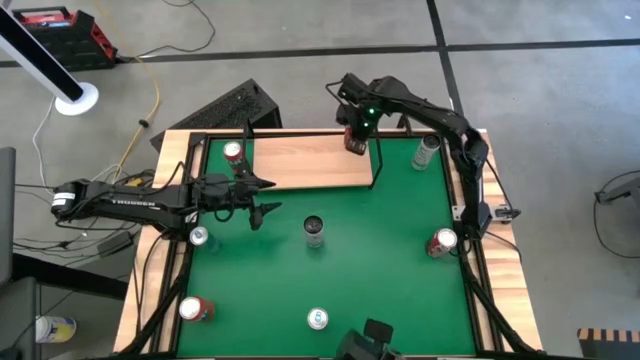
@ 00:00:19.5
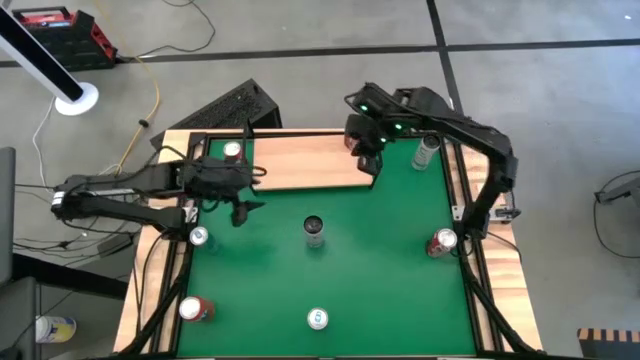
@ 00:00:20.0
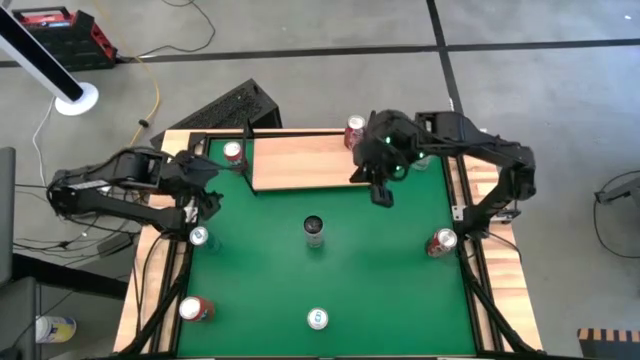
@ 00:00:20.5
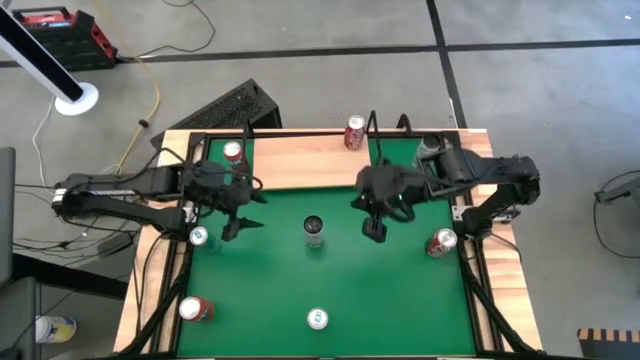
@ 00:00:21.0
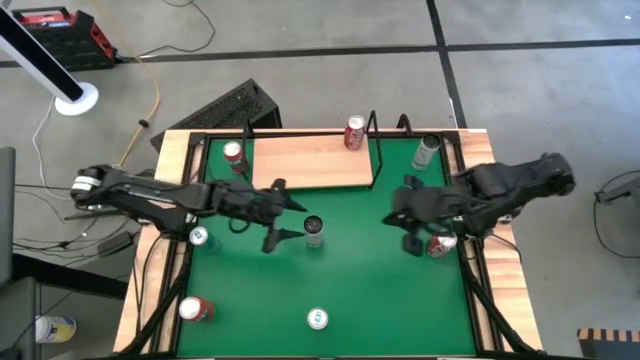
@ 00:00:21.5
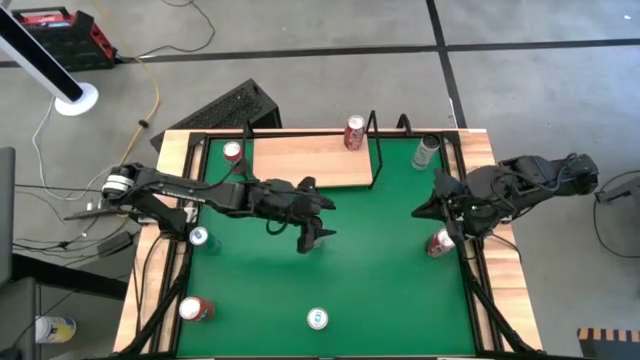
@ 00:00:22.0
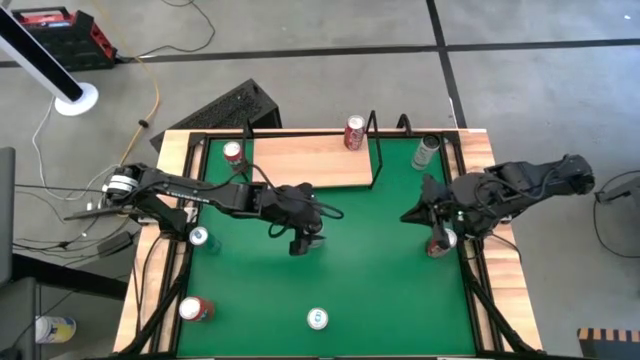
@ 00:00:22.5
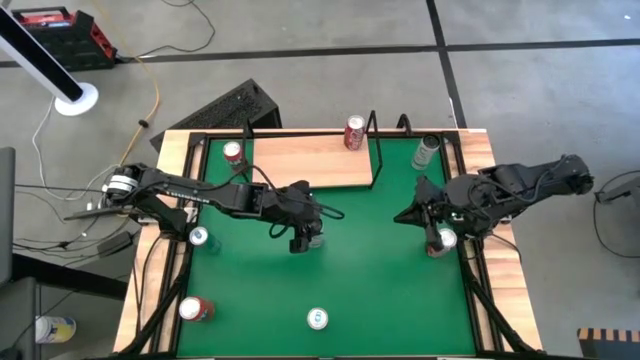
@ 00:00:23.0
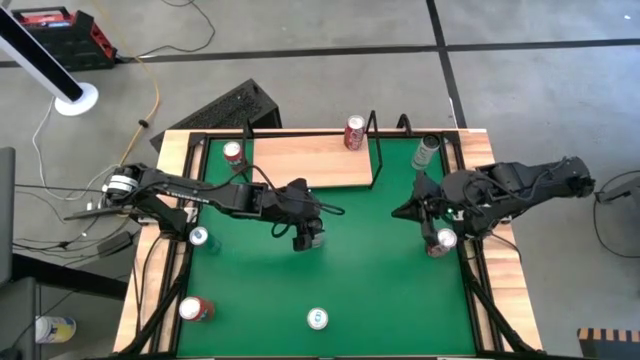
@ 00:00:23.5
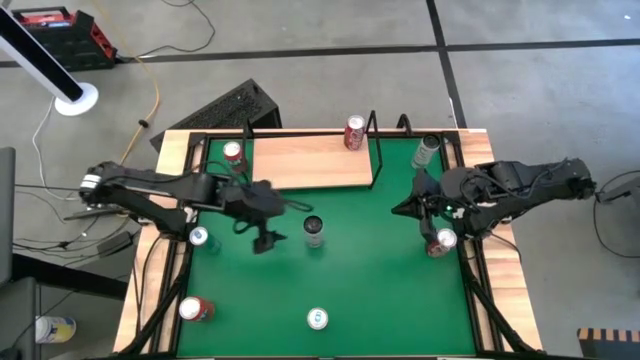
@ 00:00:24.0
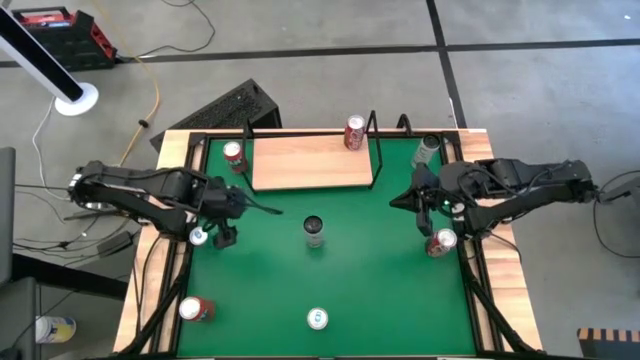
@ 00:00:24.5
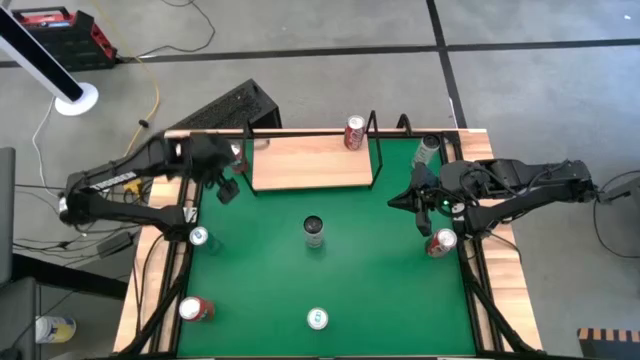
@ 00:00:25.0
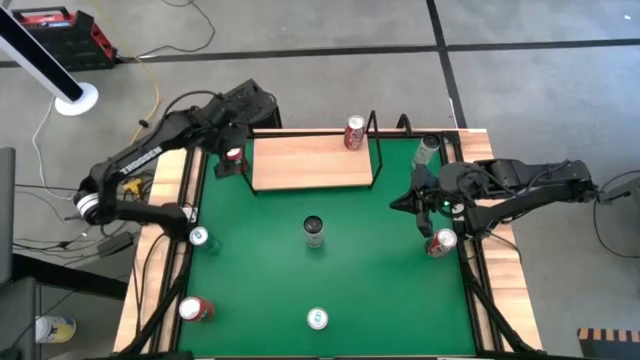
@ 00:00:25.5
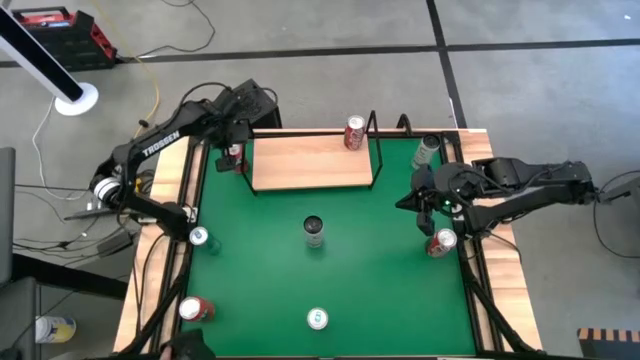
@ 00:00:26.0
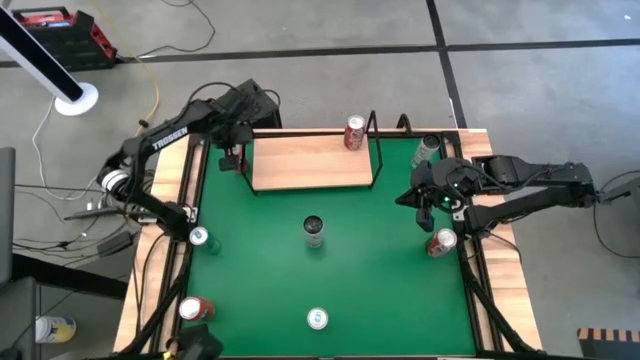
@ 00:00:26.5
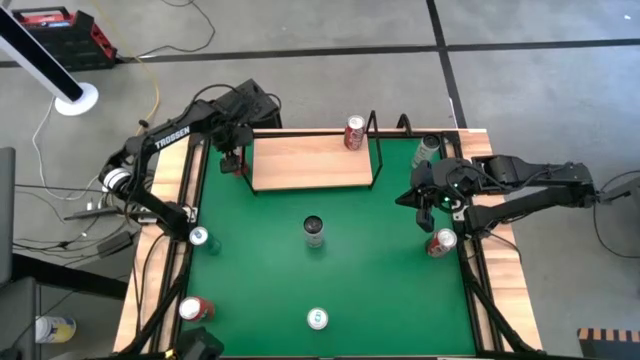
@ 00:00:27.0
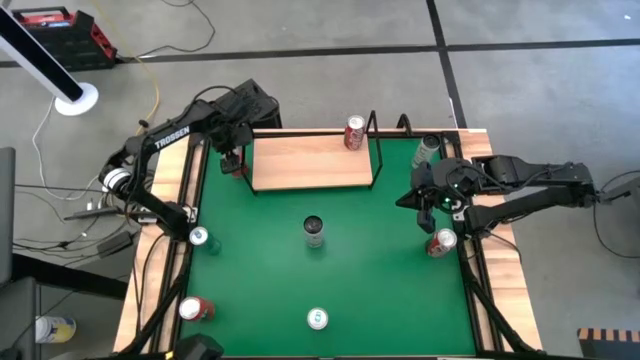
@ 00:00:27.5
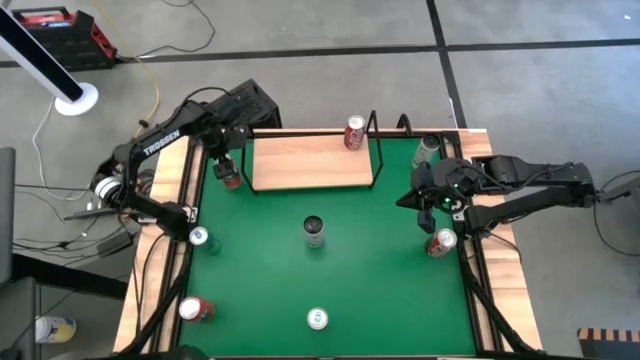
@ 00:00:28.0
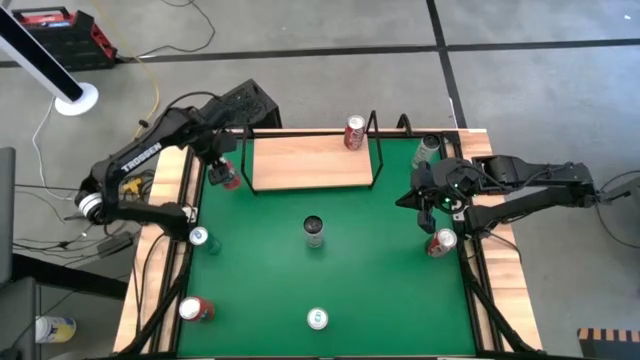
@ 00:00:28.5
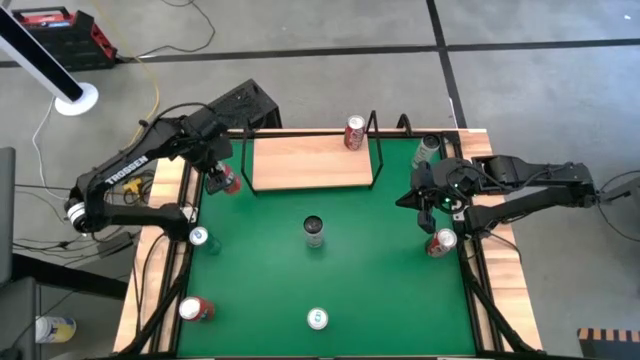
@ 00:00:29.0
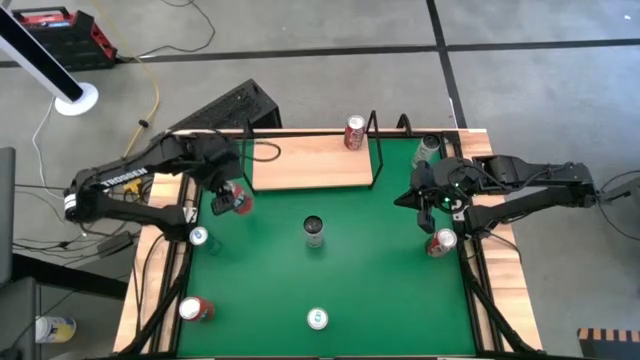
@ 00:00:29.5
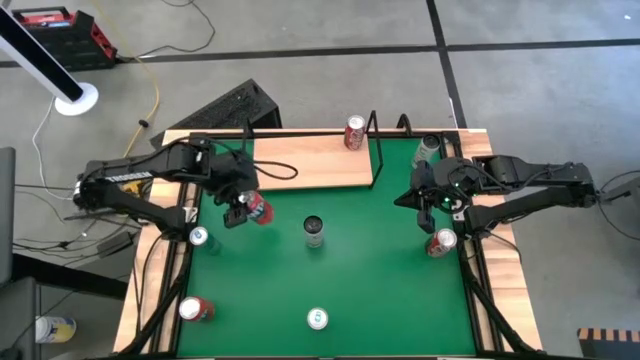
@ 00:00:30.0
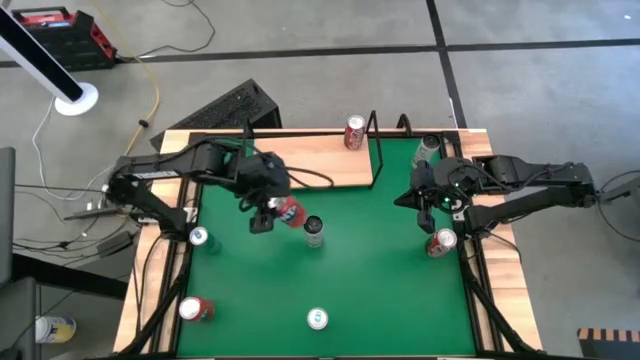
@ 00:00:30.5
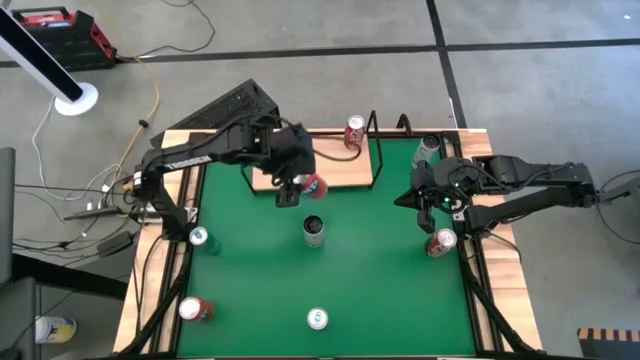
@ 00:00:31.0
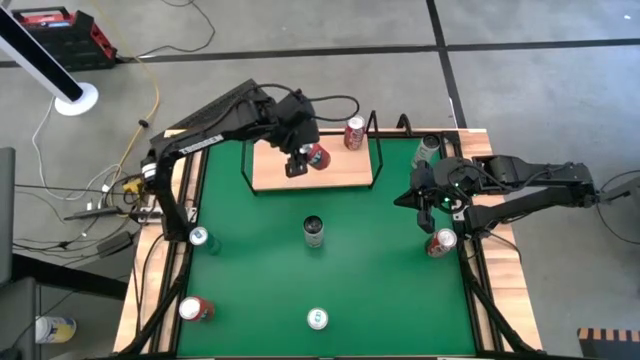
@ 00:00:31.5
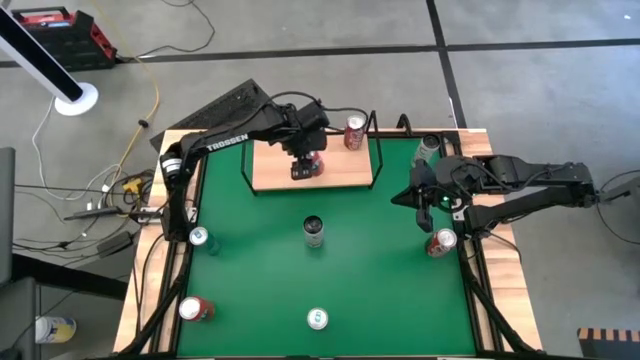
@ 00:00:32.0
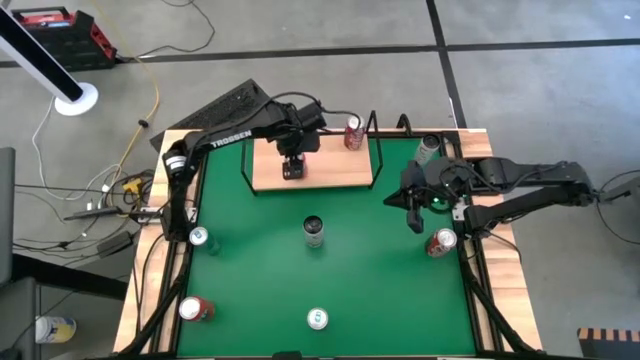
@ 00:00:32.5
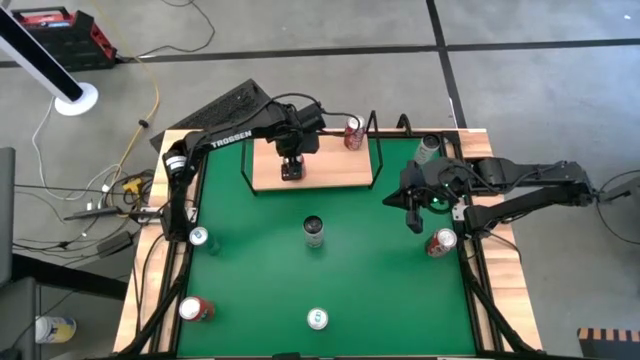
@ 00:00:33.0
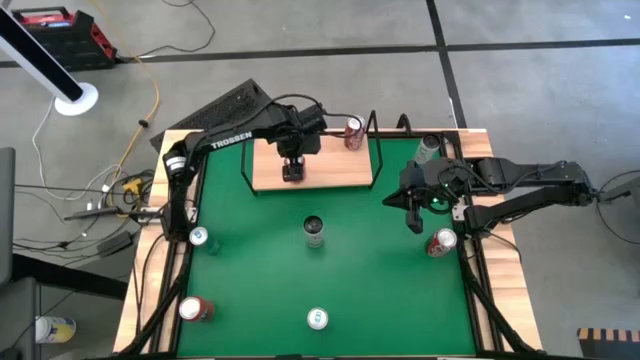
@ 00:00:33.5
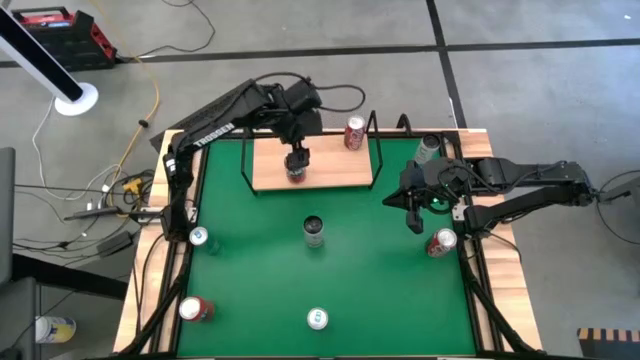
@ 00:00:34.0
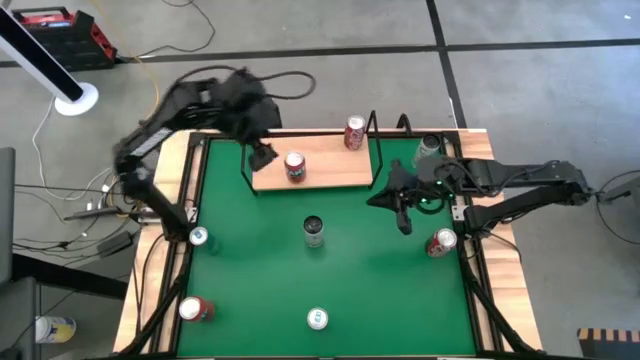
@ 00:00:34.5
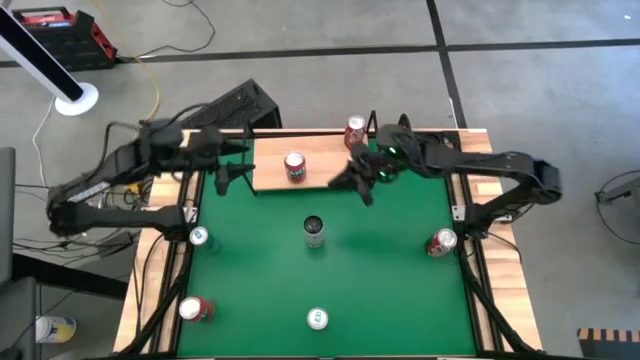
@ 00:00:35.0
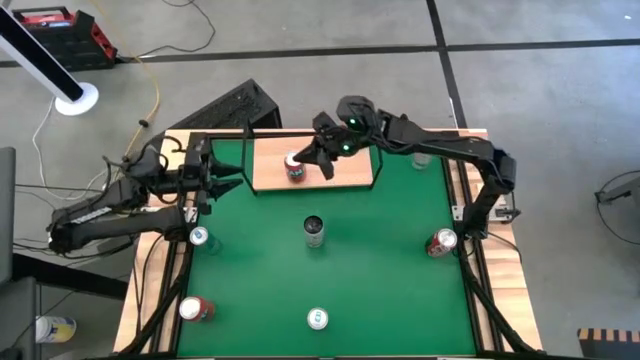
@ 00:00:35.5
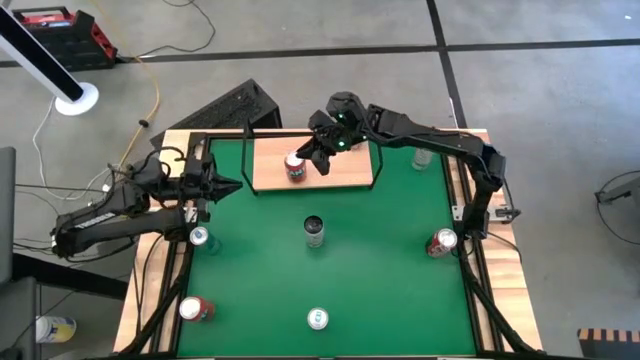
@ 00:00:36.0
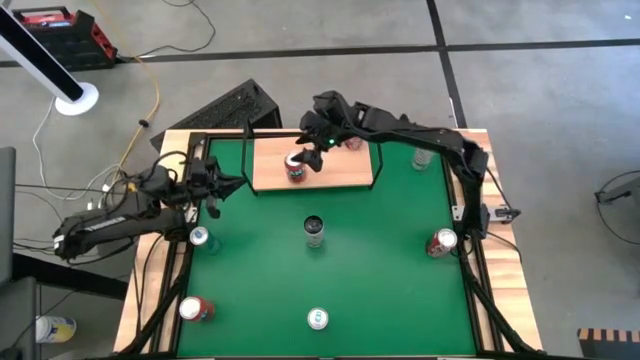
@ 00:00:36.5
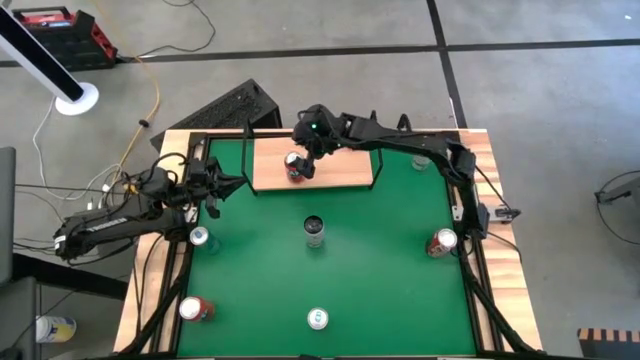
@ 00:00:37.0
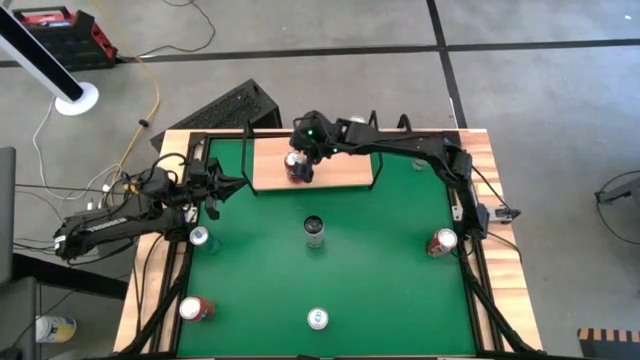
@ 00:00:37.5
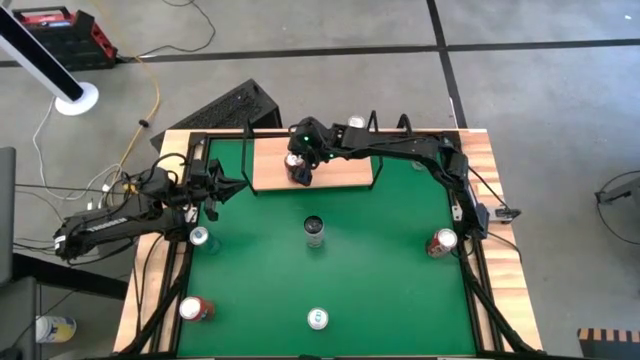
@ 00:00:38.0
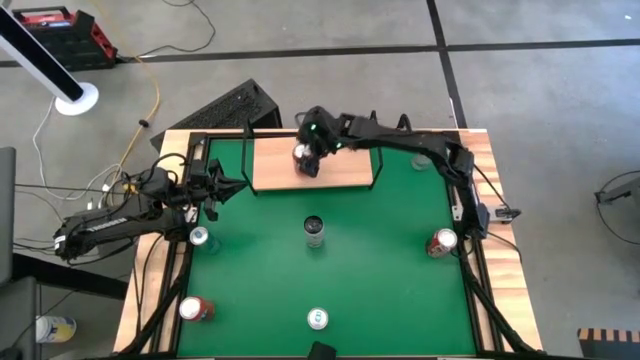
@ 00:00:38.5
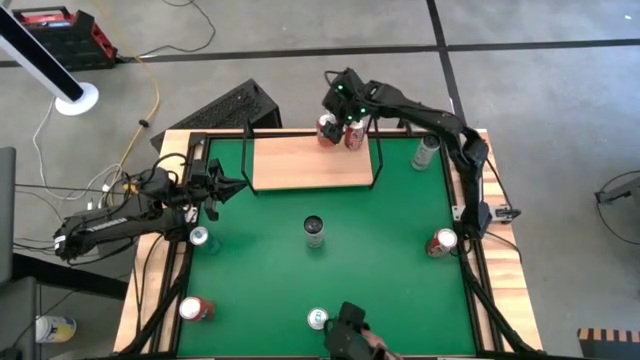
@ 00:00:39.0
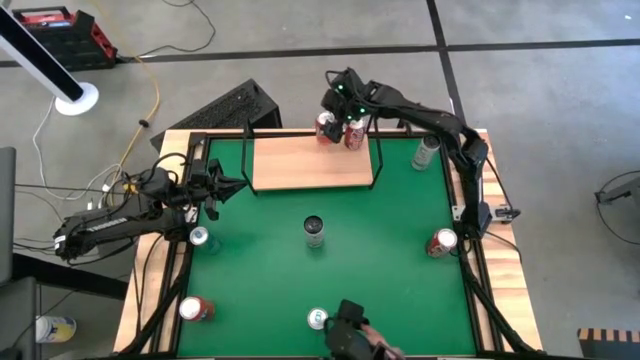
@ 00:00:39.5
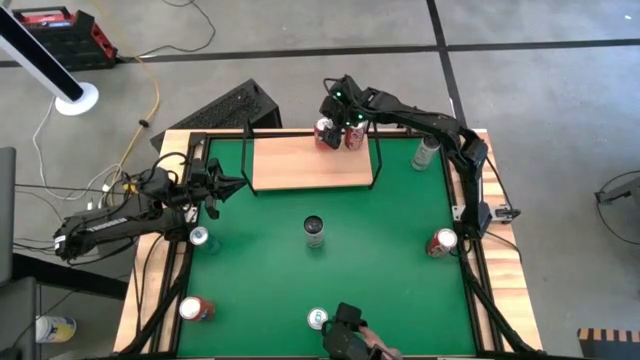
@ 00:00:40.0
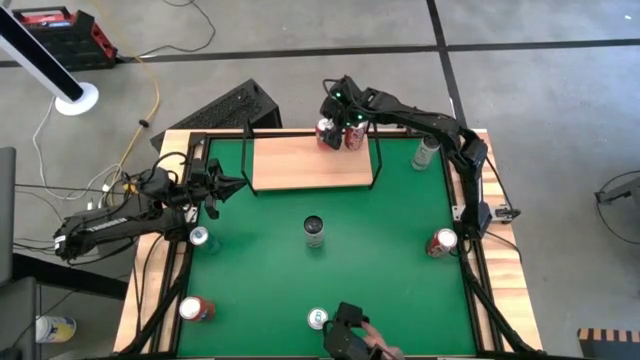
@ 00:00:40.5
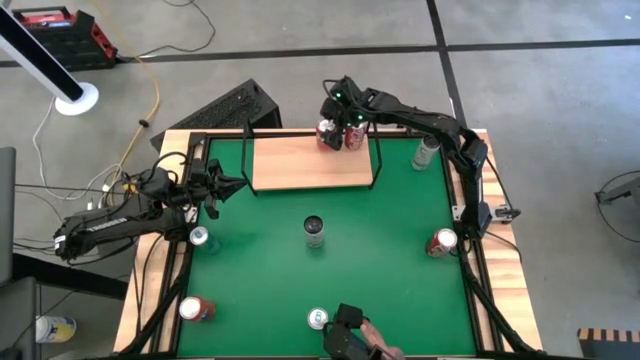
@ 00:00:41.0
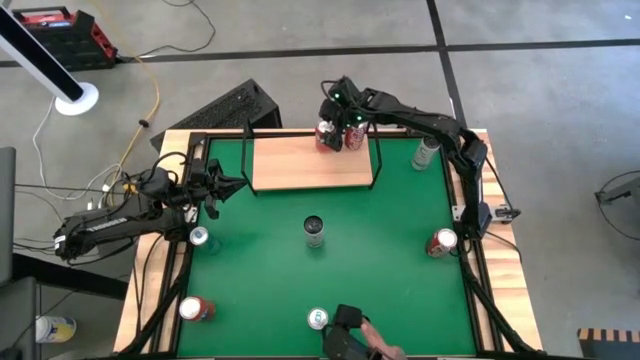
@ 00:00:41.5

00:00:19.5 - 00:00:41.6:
Task: Place canned beverage on shelf
Put the top orange soda can on the shelf
